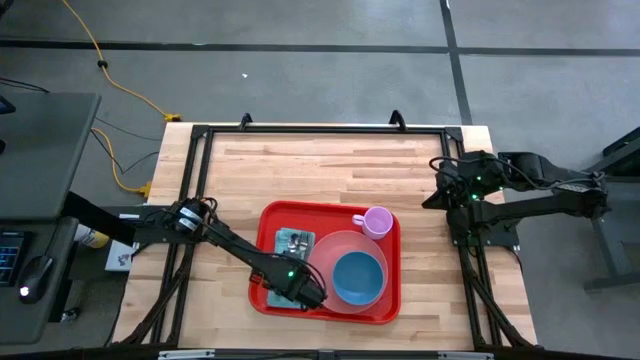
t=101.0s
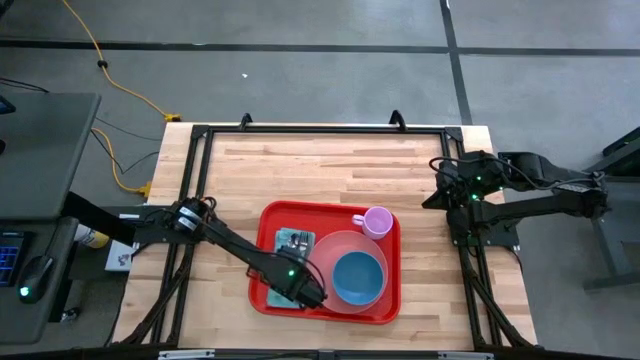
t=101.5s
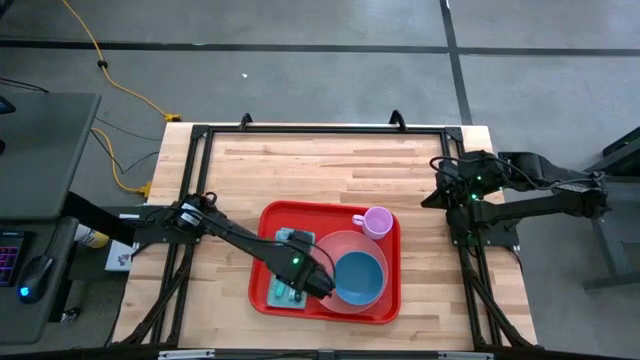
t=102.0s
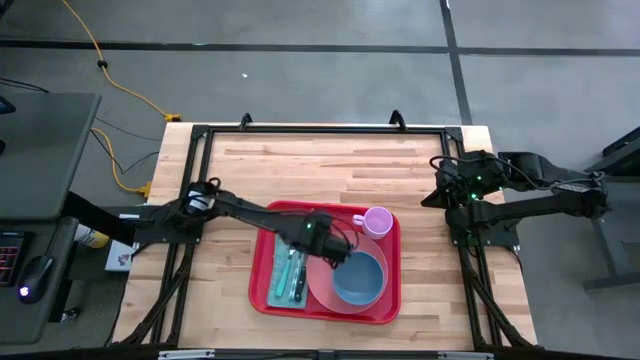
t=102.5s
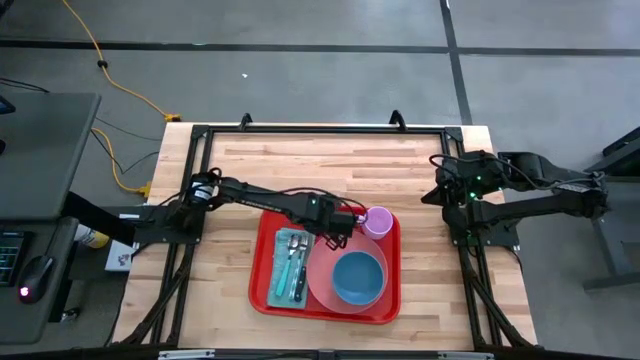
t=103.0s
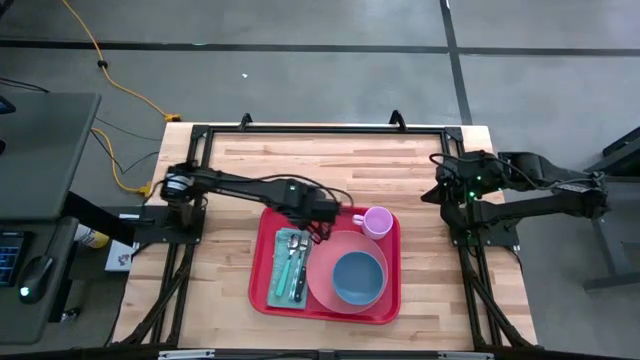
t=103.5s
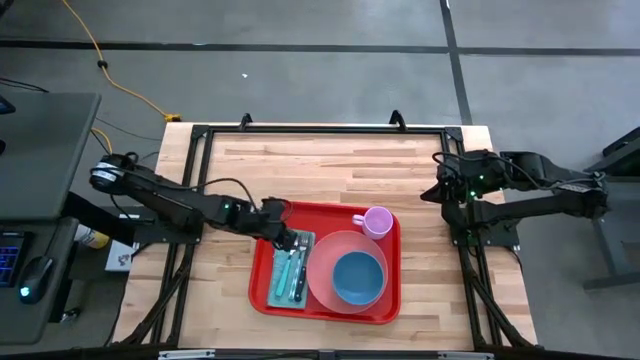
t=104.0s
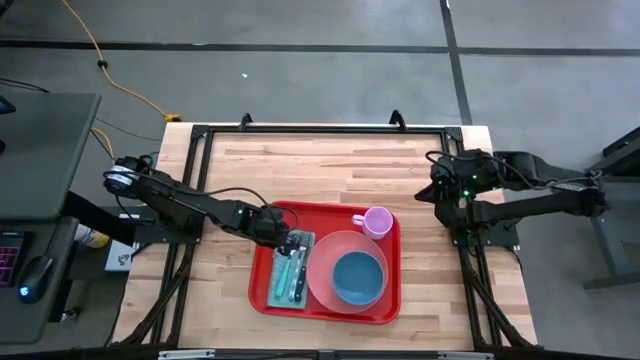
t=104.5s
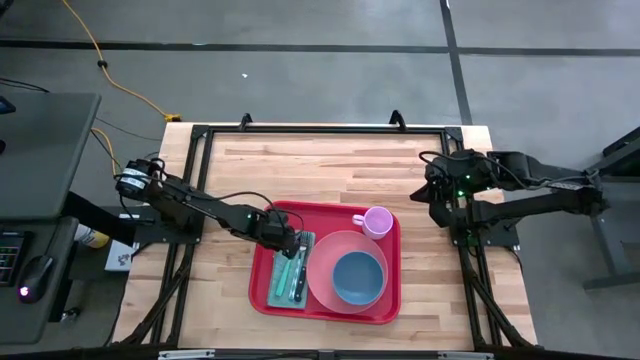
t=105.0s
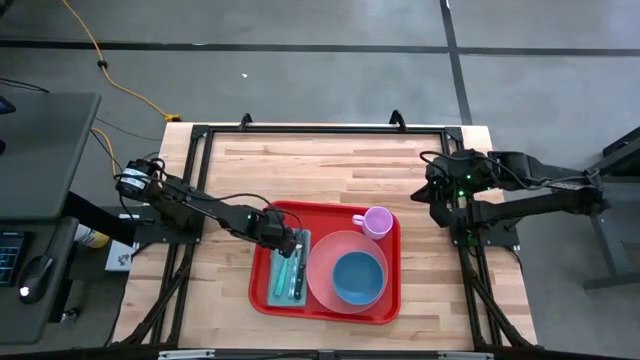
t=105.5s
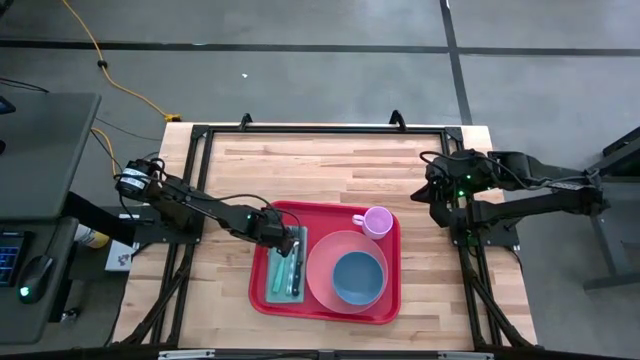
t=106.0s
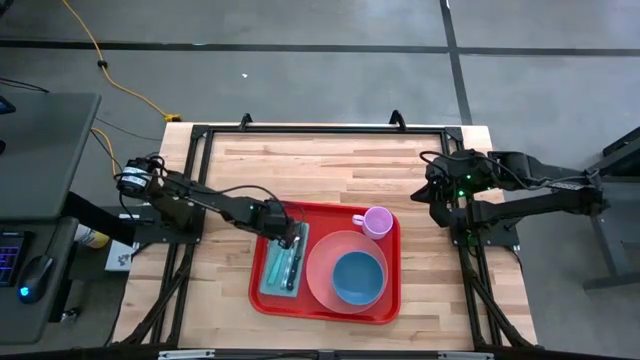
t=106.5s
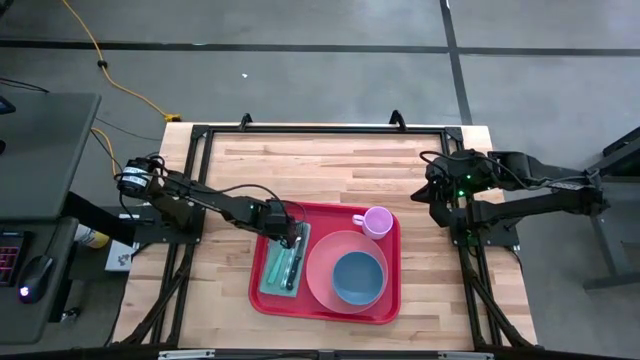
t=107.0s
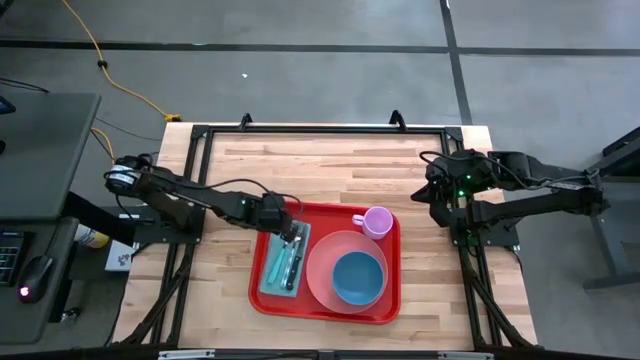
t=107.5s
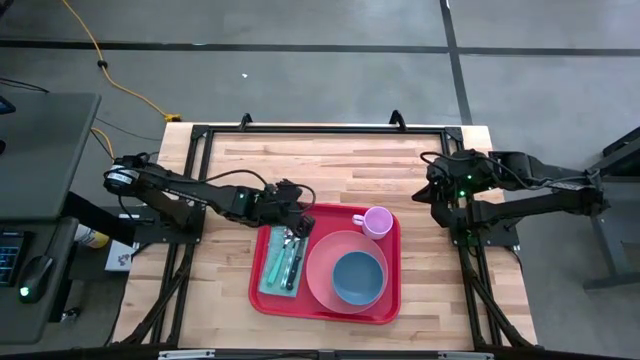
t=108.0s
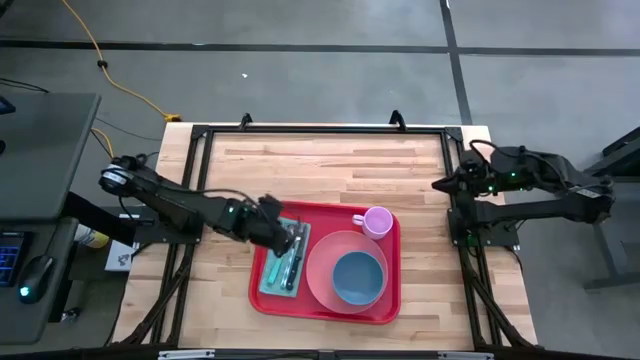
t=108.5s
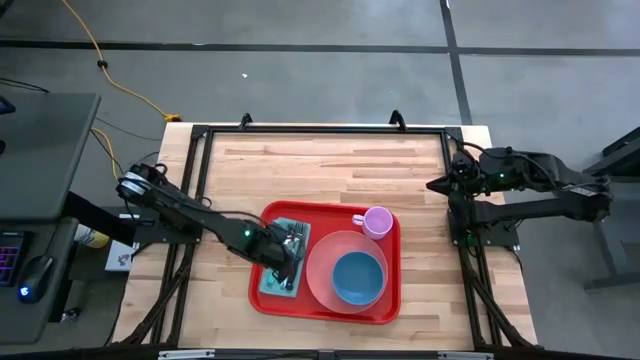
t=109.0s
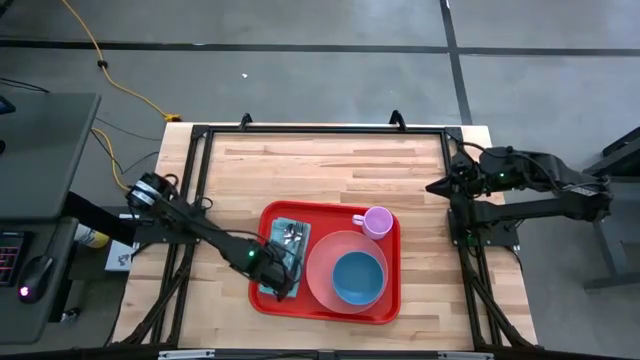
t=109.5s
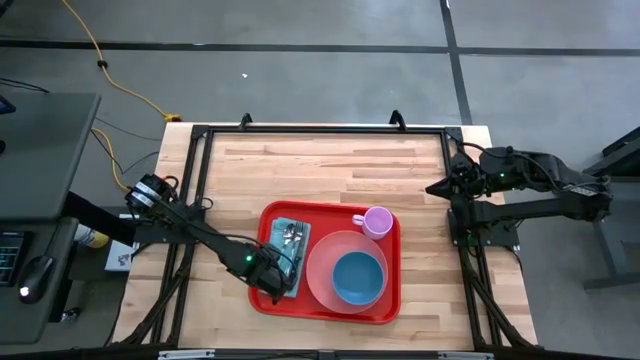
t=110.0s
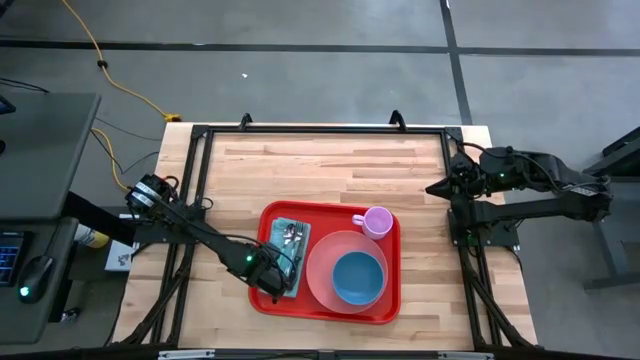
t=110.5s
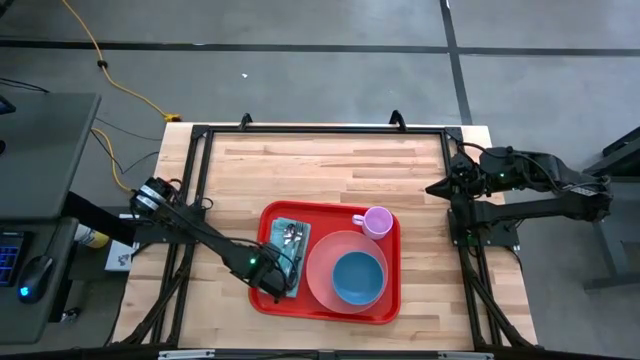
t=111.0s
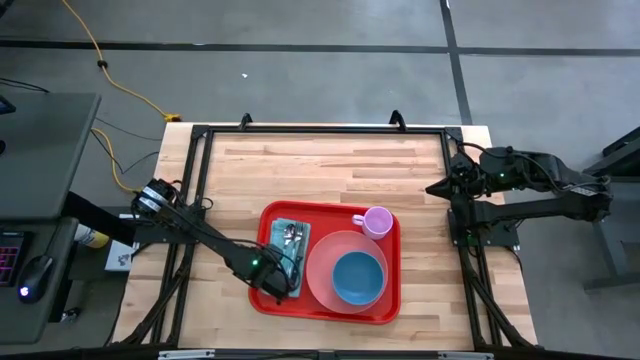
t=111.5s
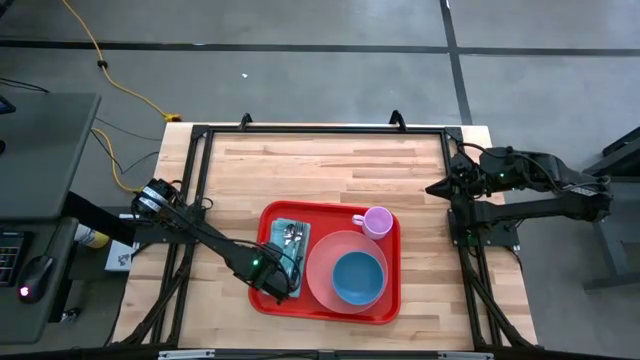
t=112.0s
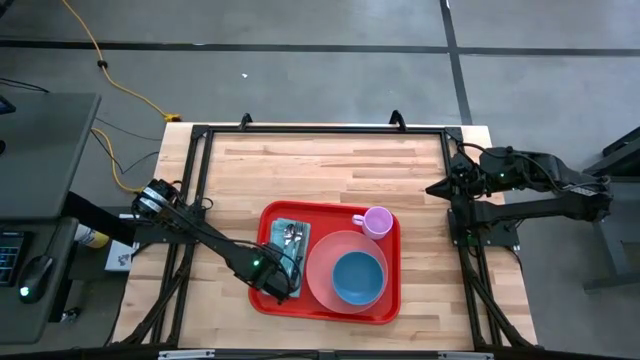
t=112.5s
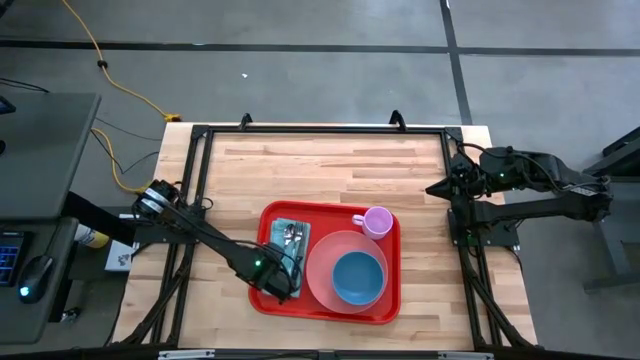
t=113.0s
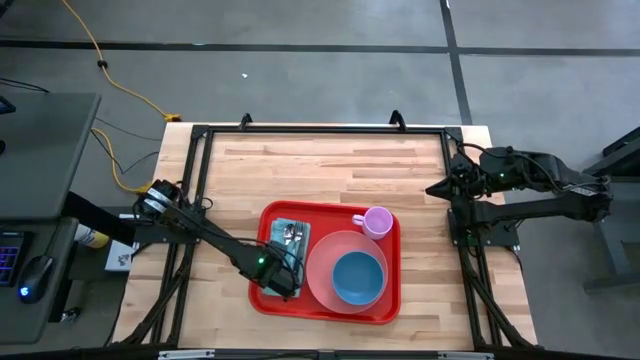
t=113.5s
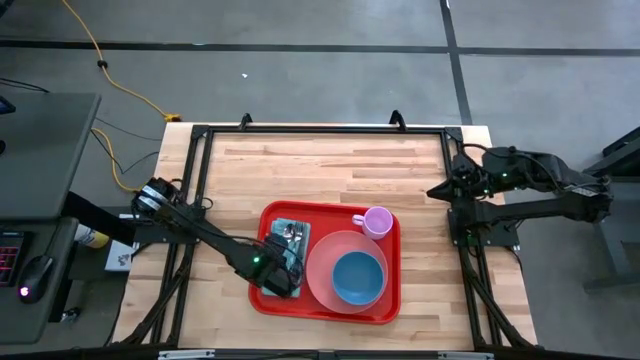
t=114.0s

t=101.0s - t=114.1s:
Task: Set up tray
Adjust the blue napkin

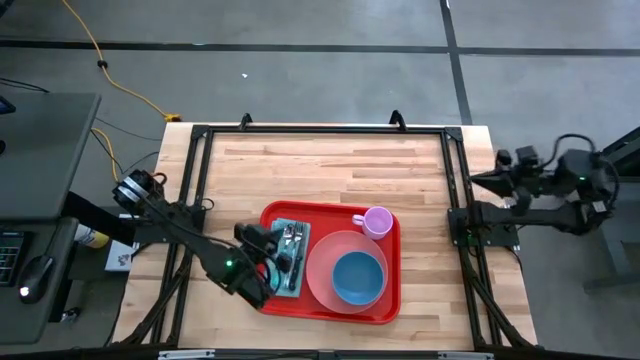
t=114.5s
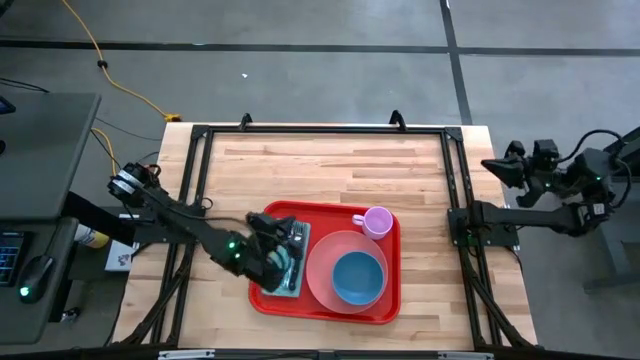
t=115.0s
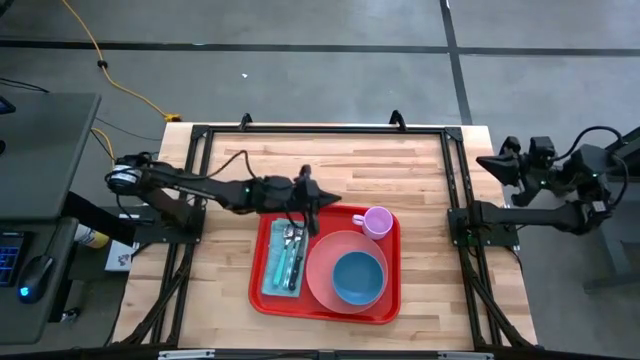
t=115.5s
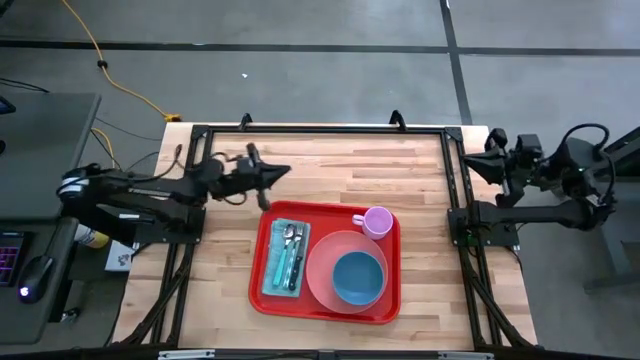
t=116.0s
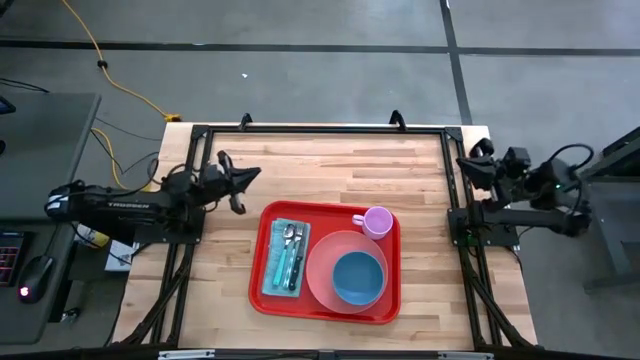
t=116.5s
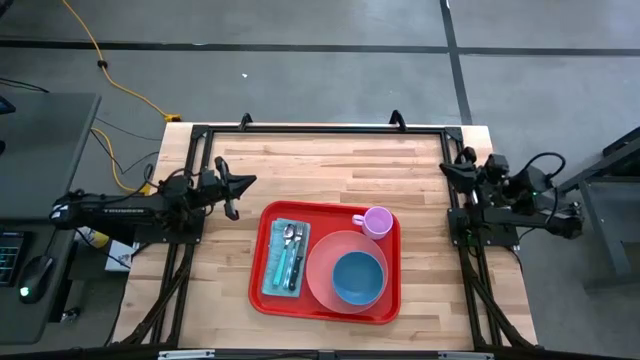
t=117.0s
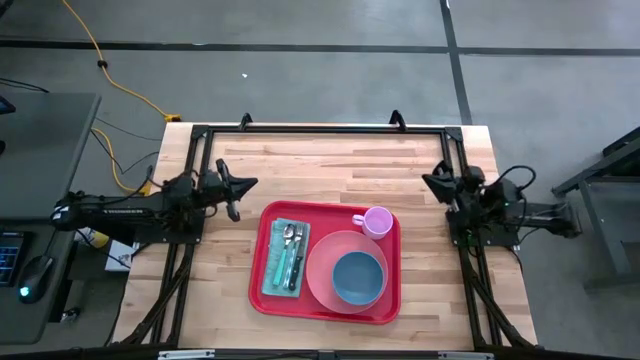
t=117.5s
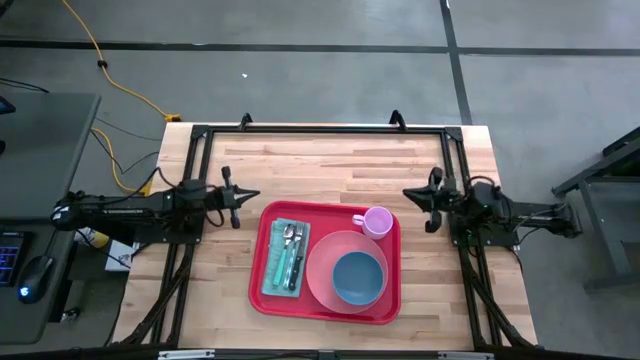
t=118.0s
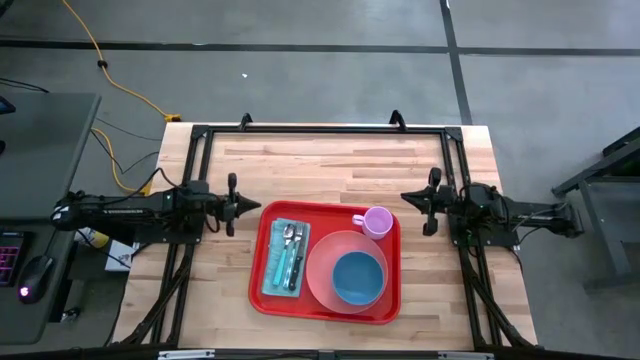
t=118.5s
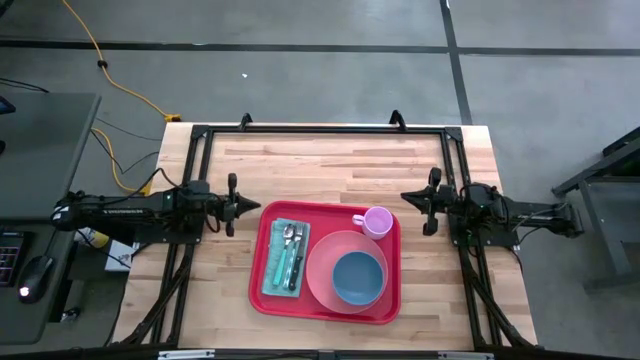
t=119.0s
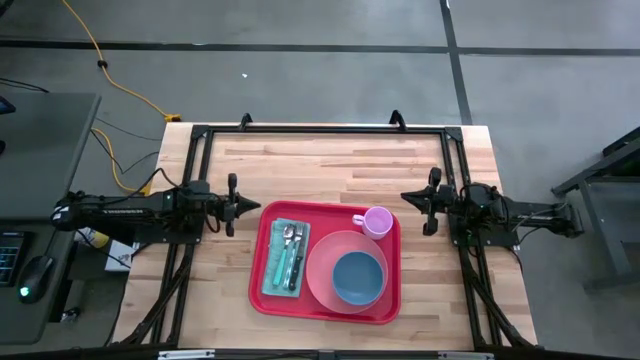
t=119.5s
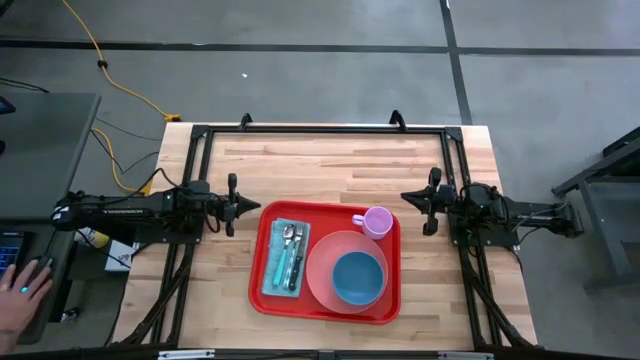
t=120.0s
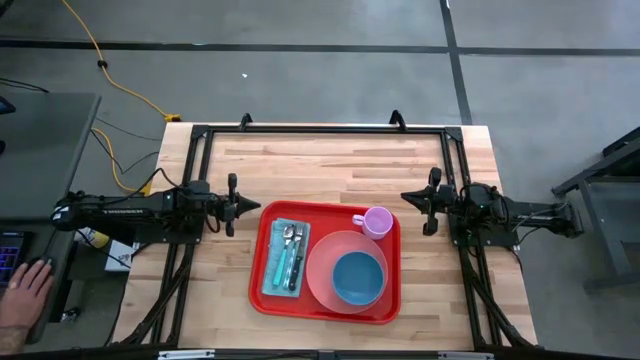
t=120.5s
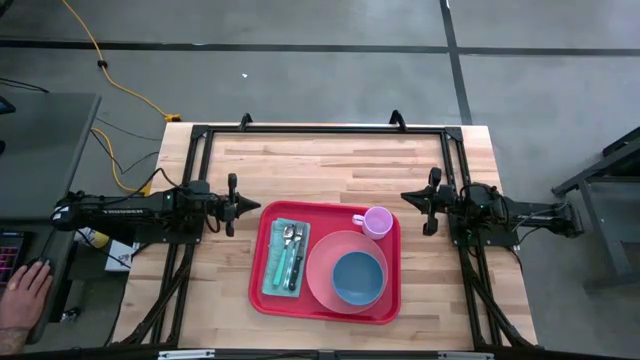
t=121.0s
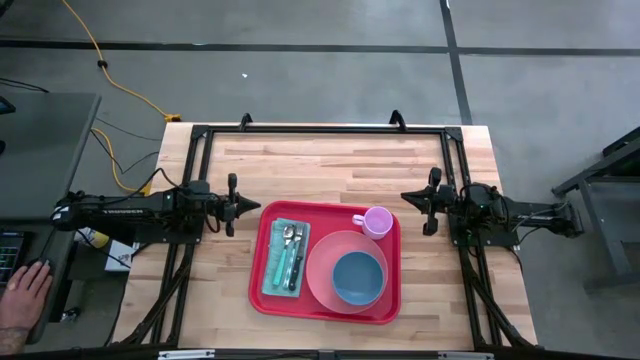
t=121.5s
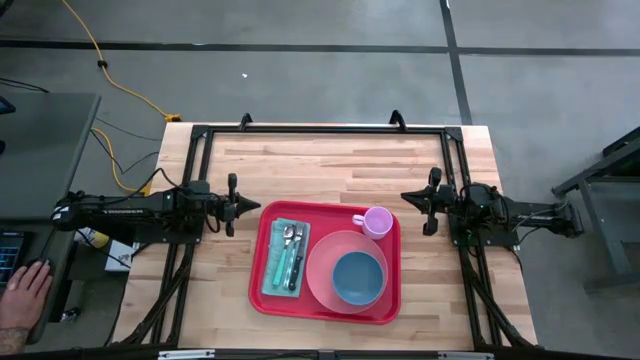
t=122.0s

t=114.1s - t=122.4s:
Return to Home Position
